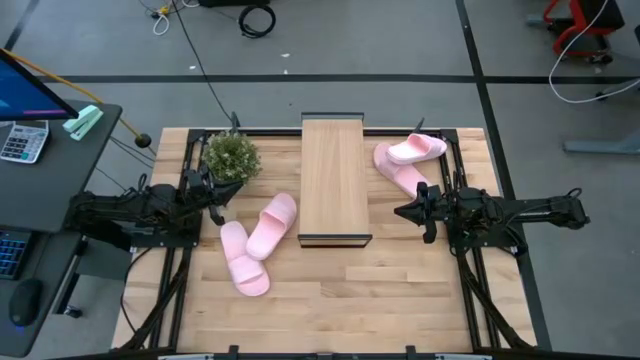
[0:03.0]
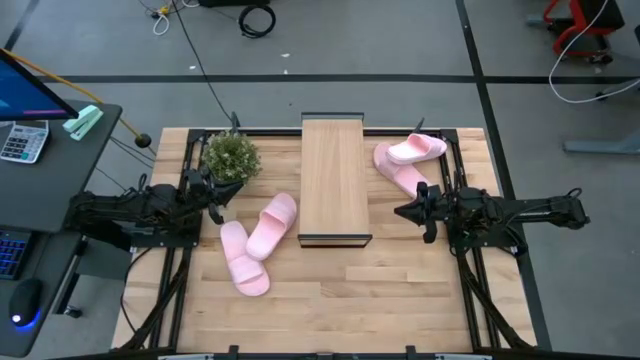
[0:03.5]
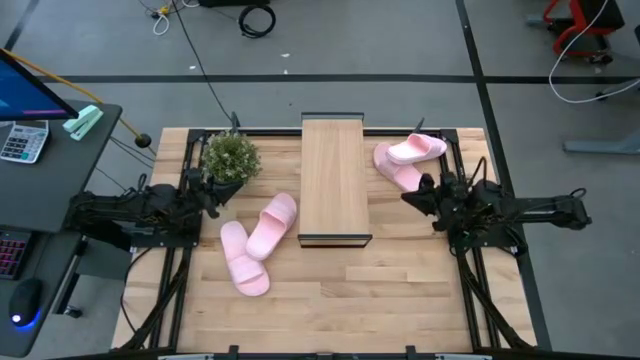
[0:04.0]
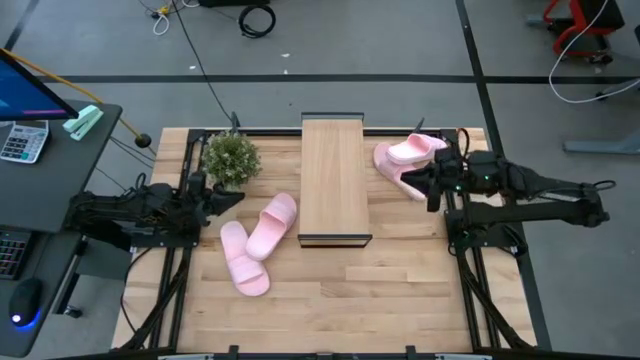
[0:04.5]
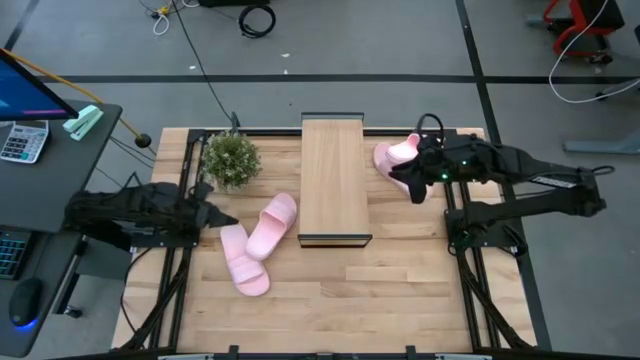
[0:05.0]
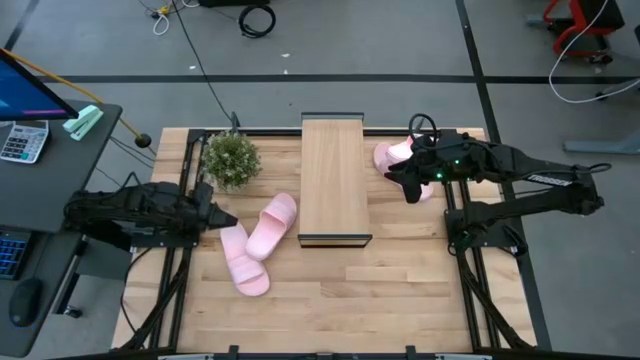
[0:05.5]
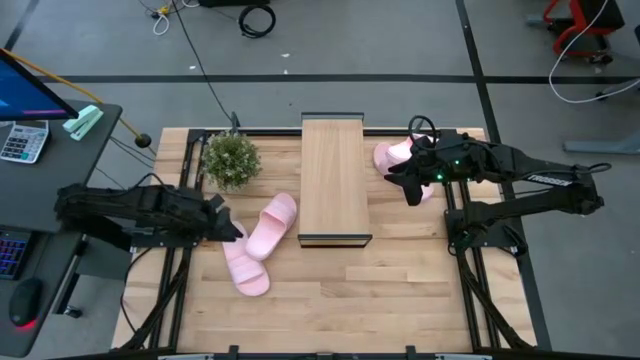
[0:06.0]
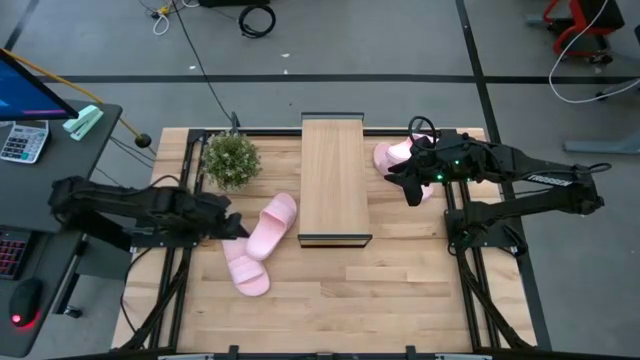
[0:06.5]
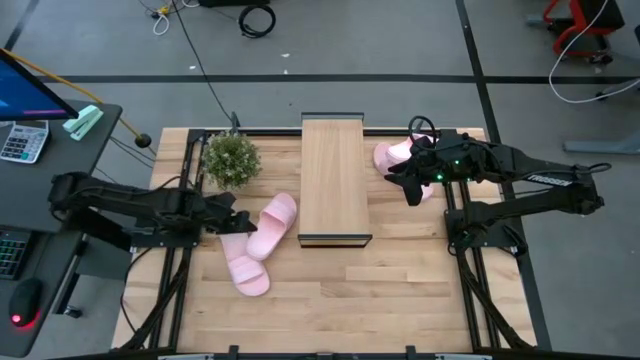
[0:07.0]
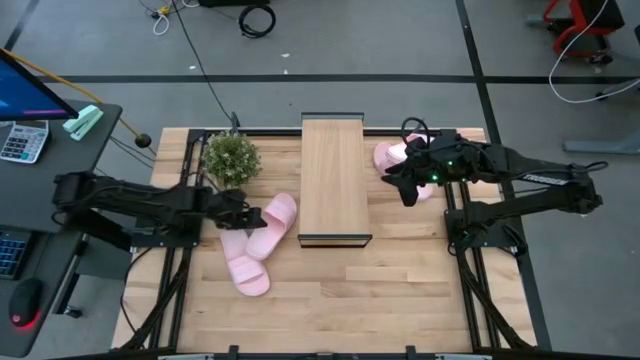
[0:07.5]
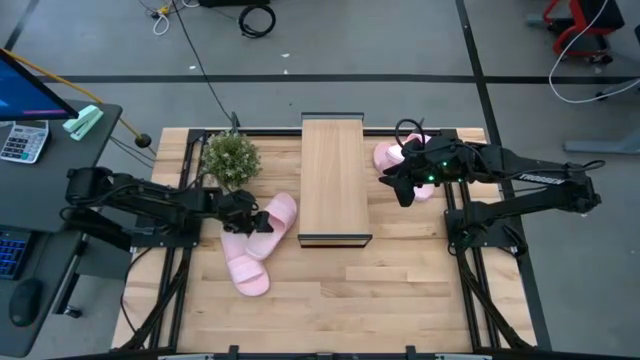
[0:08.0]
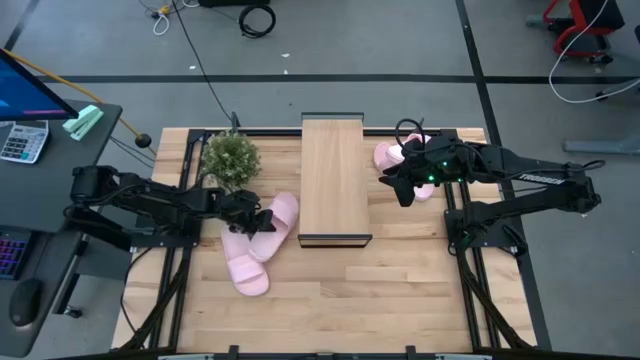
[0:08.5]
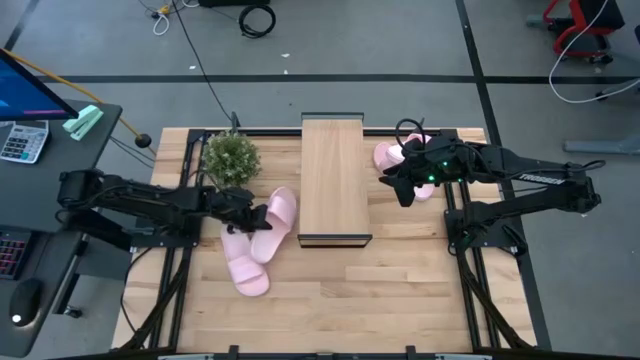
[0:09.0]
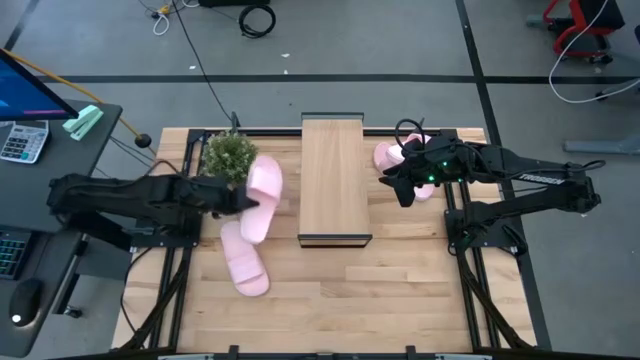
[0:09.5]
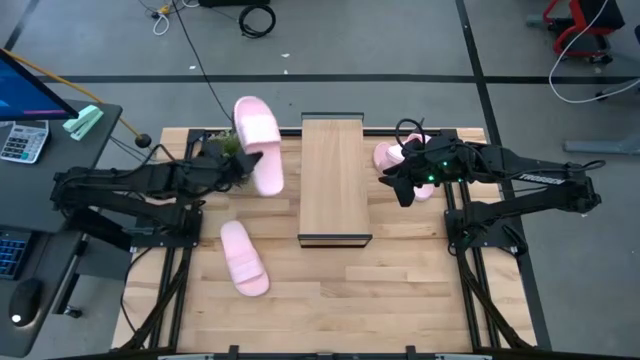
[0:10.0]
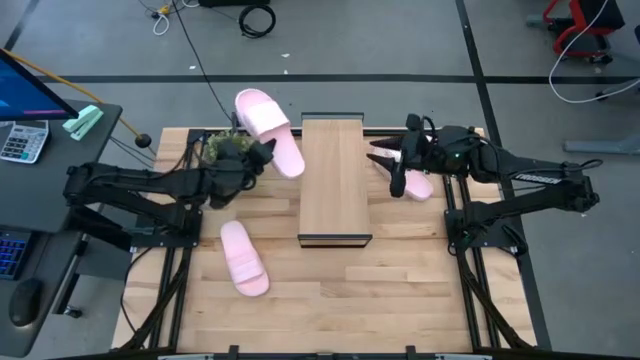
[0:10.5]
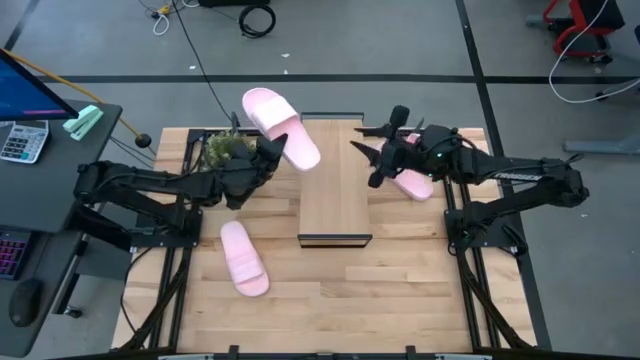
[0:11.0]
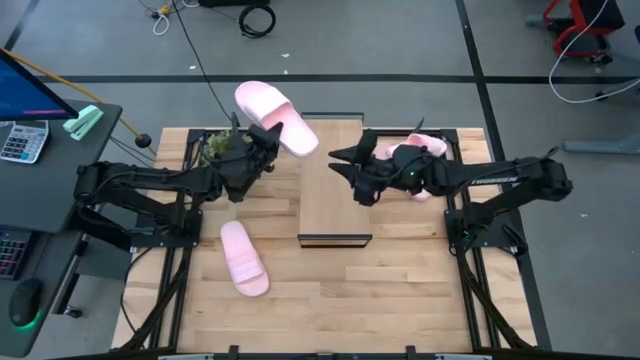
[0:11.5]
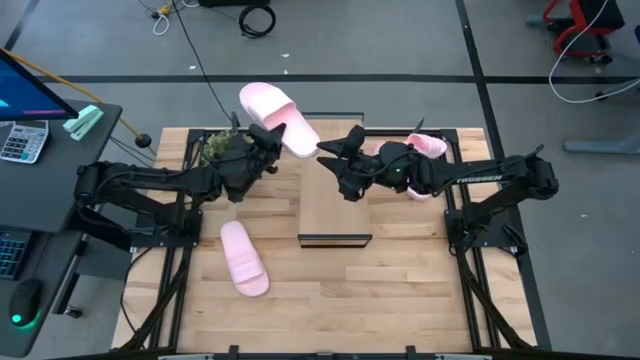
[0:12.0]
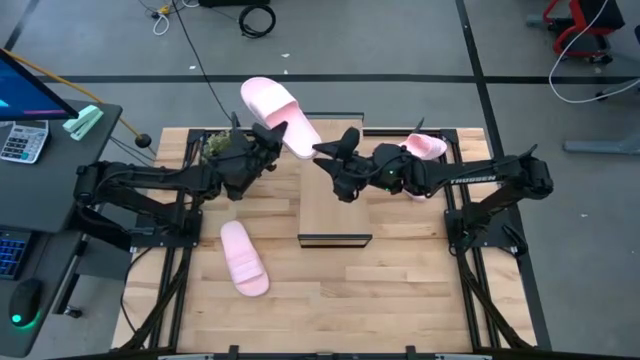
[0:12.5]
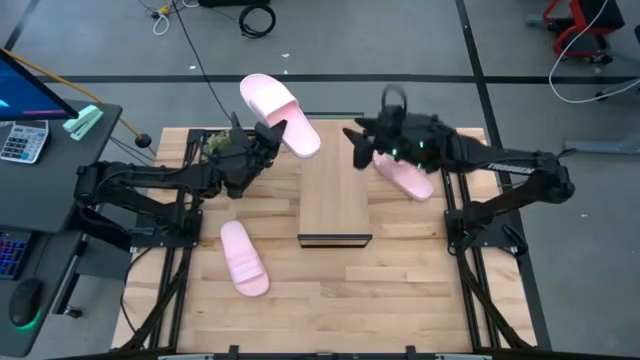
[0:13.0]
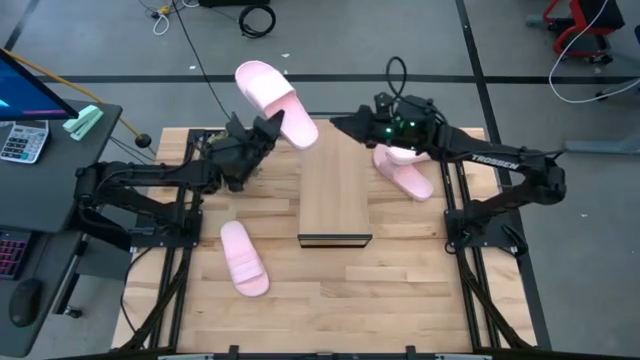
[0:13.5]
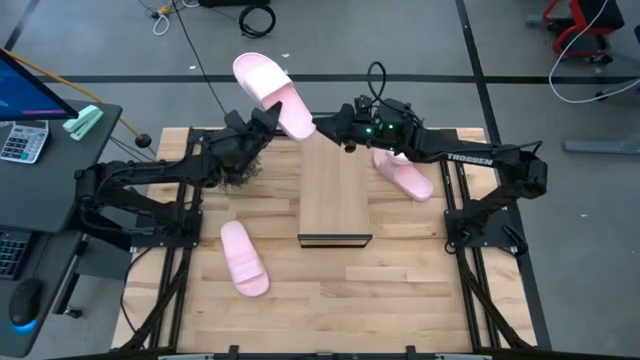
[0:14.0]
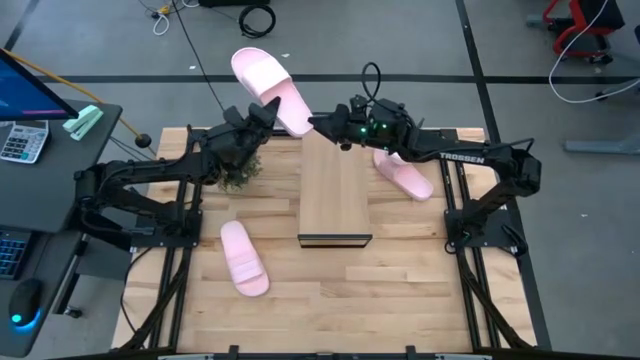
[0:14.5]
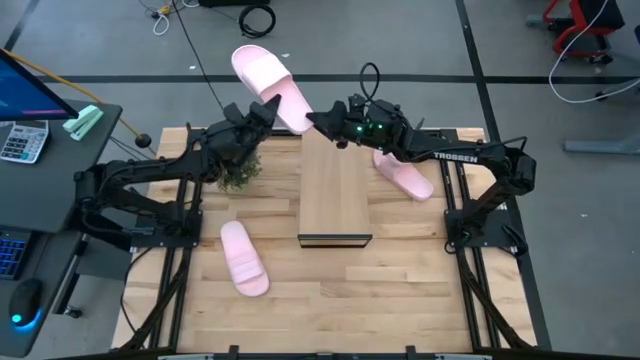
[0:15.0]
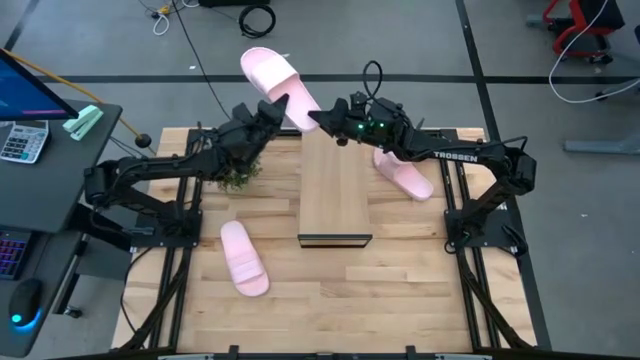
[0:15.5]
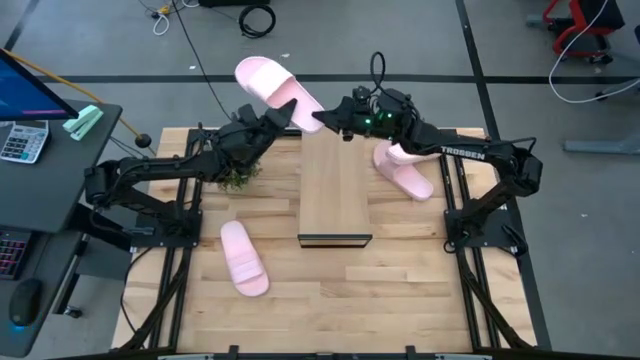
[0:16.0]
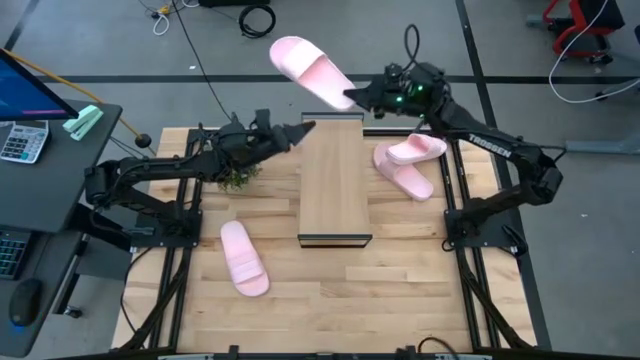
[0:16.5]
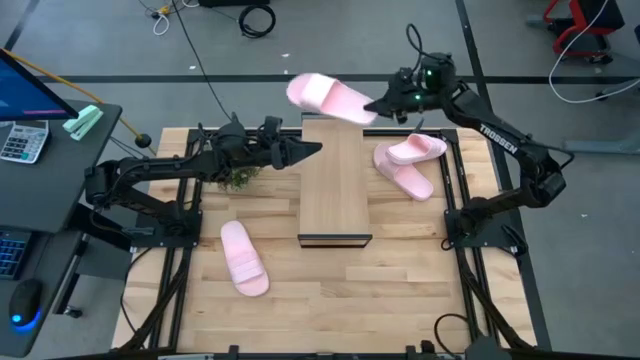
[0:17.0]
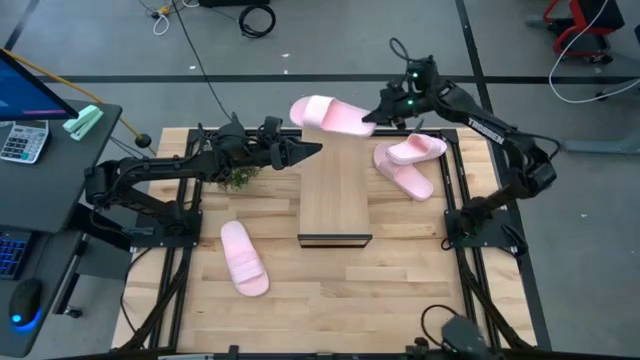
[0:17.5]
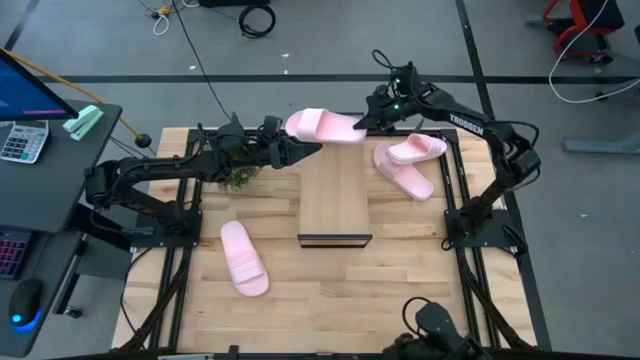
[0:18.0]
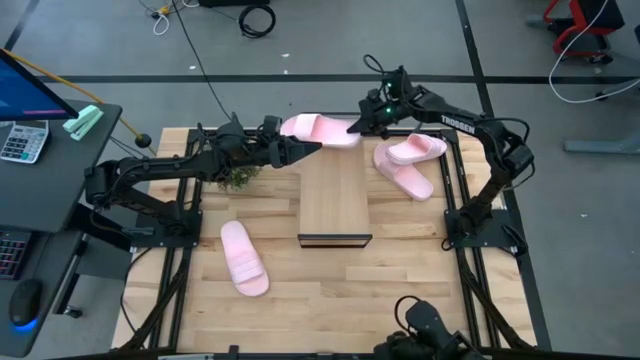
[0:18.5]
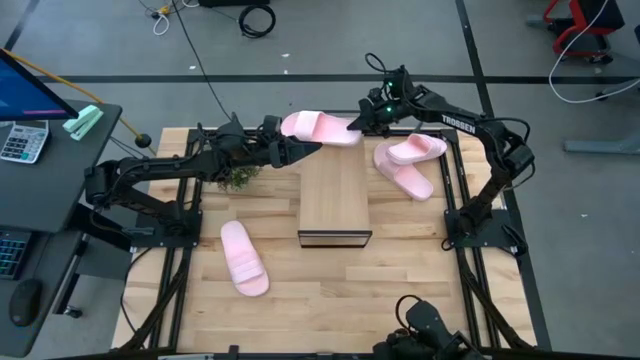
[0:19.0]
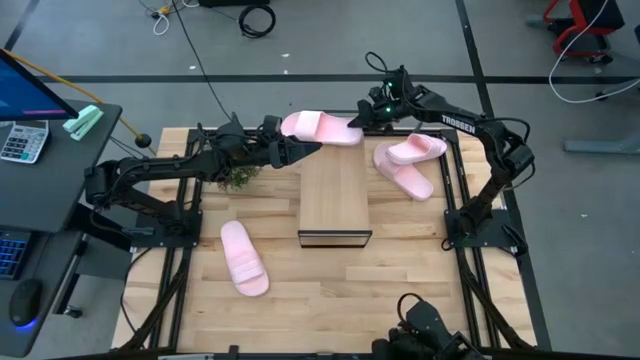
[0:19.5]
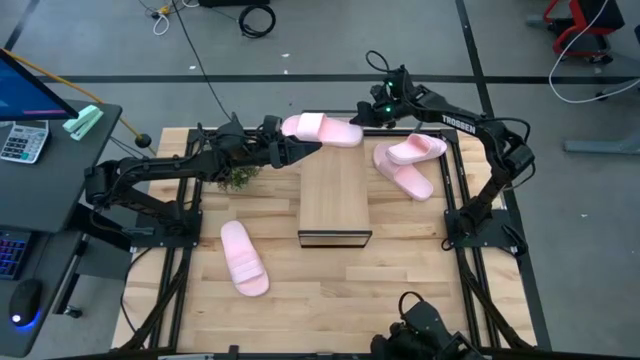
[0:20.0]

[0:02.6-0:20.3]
Task: Pick and place slides into the shelf
Put the pink slide on the shelf

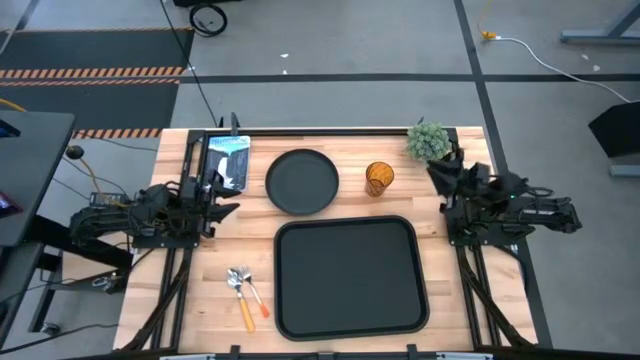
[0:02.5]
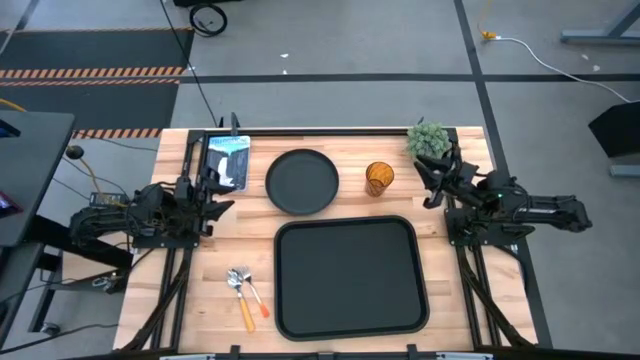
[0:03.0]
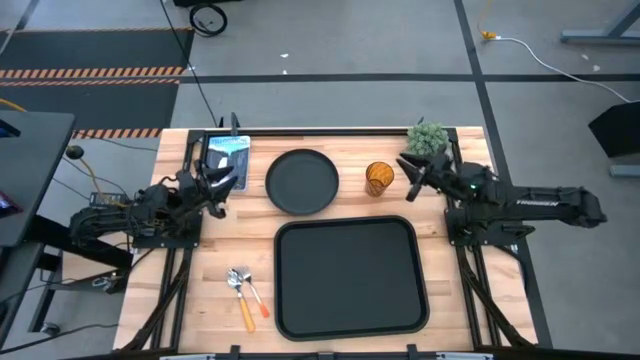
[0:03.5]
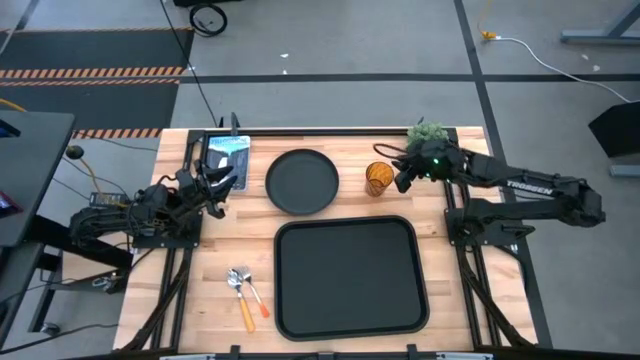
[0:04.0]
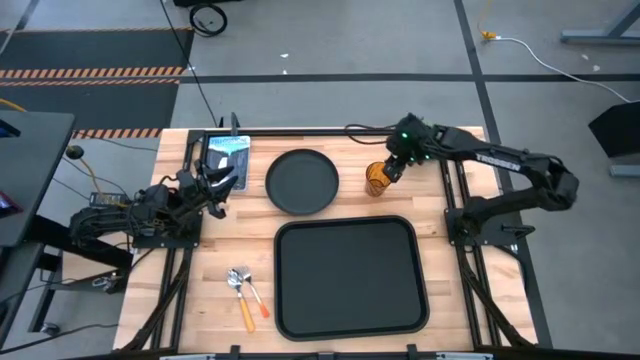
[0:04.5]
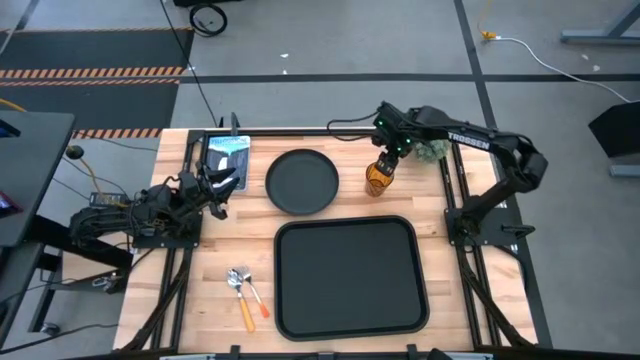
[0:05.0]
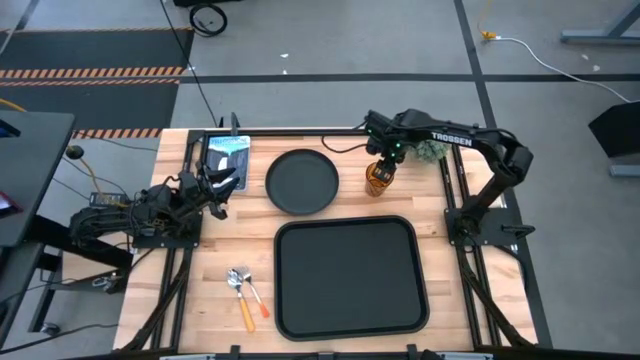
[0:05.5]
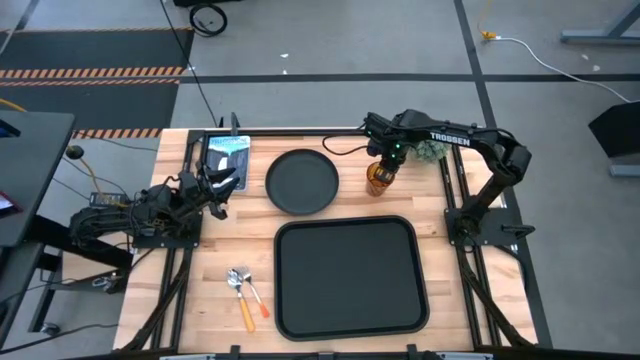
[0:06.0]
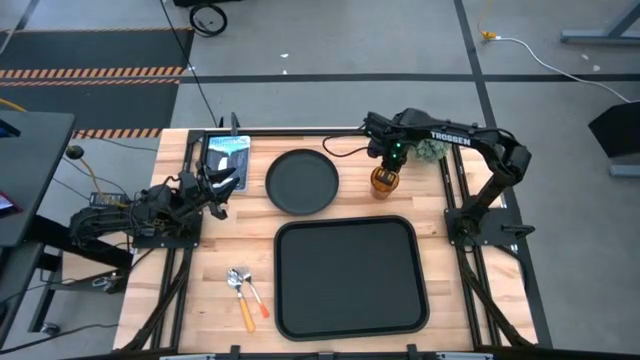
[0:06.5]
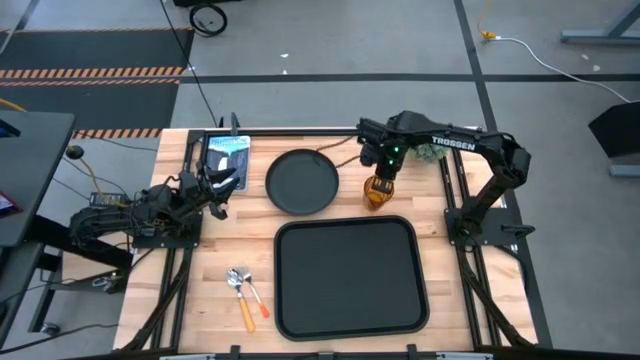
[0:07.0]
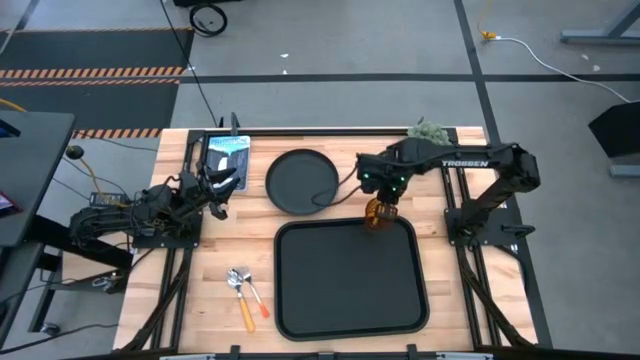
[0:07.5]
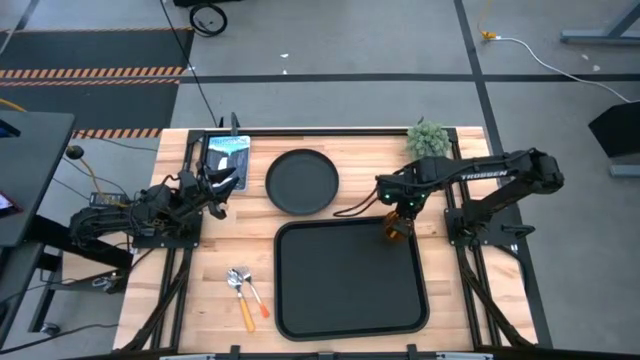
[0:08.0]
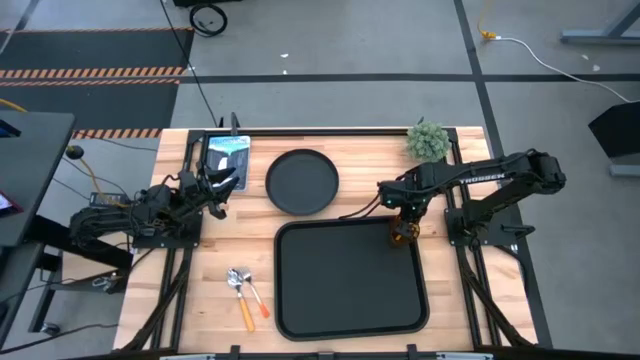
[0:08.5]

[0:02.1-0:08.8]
Task: Pick and place plate/cup/fork/spoon on tray
Put the brown cup on the top right of the serving tray
